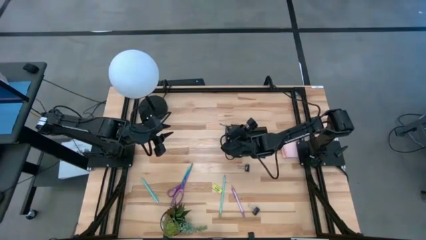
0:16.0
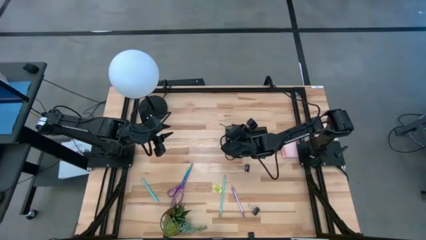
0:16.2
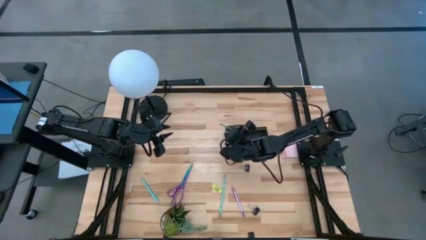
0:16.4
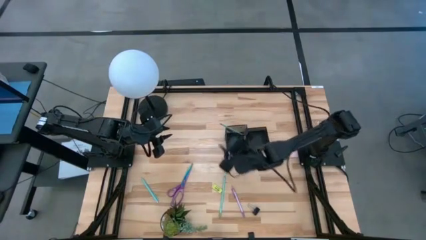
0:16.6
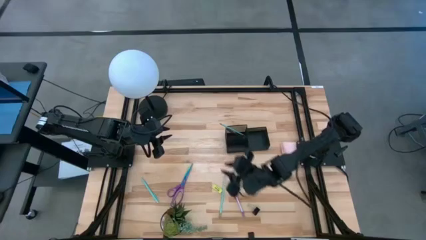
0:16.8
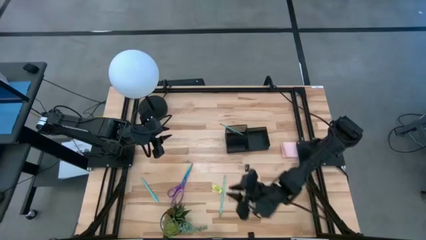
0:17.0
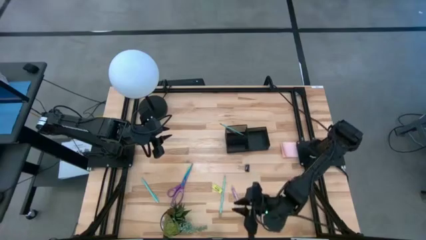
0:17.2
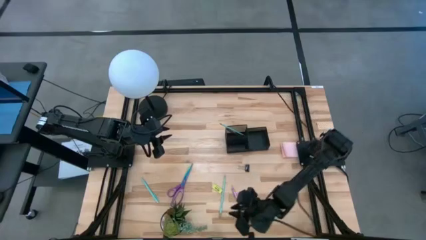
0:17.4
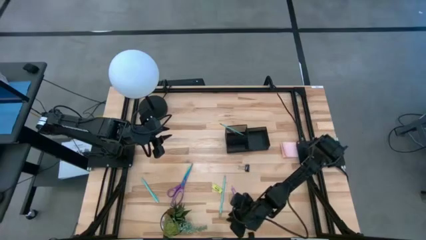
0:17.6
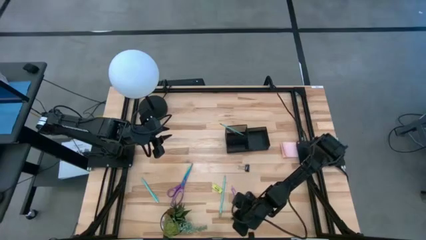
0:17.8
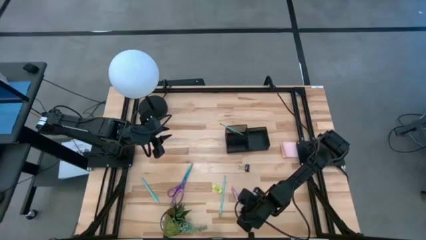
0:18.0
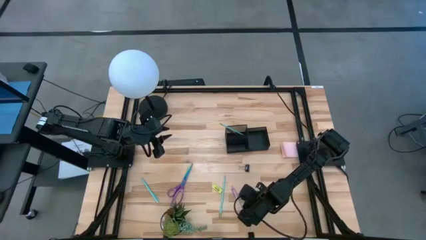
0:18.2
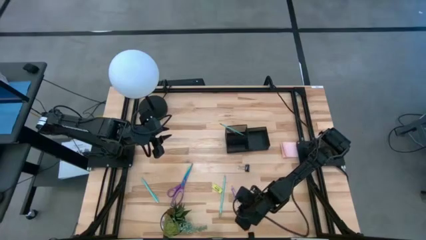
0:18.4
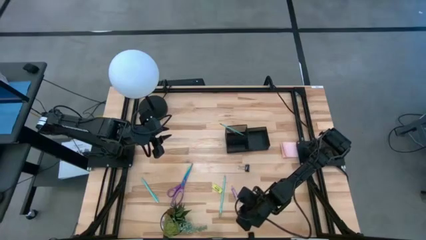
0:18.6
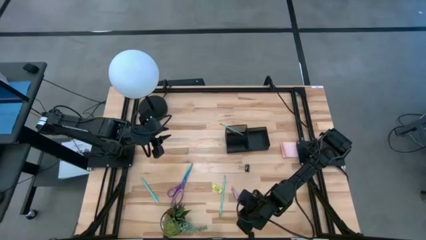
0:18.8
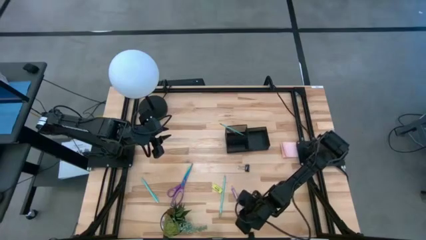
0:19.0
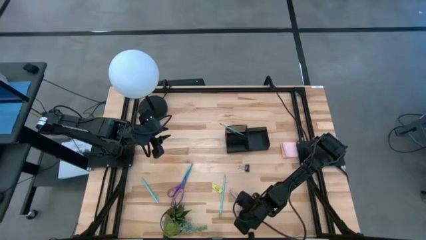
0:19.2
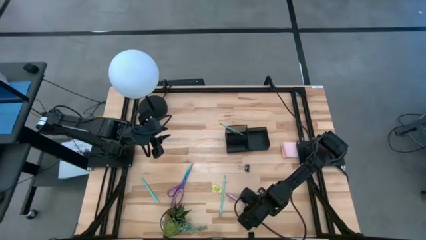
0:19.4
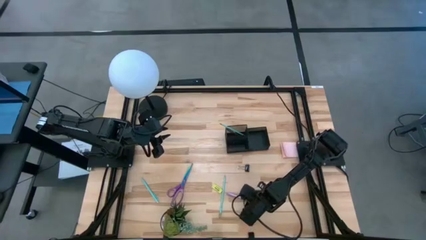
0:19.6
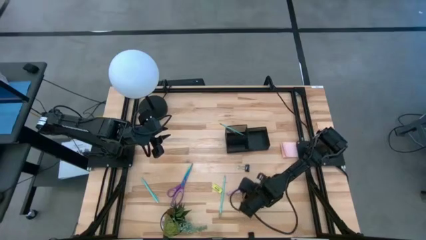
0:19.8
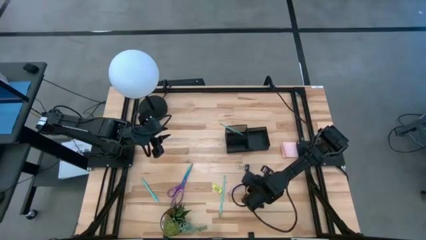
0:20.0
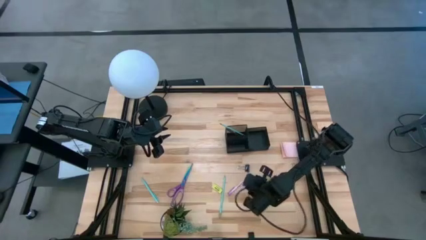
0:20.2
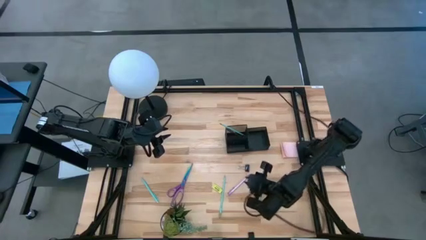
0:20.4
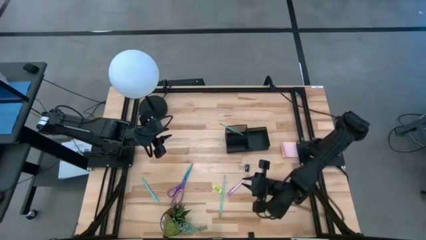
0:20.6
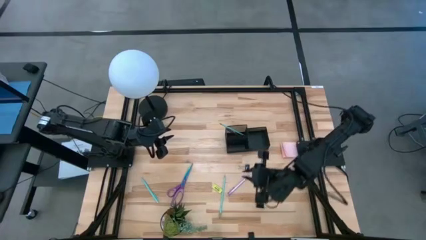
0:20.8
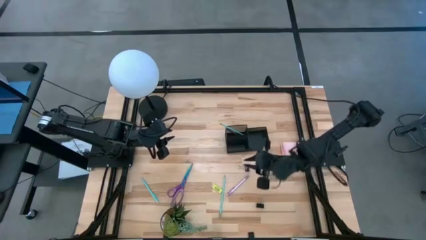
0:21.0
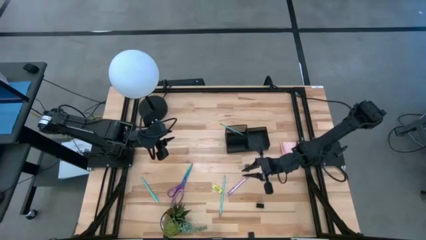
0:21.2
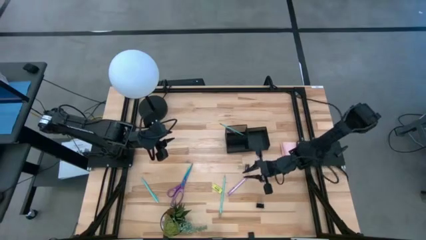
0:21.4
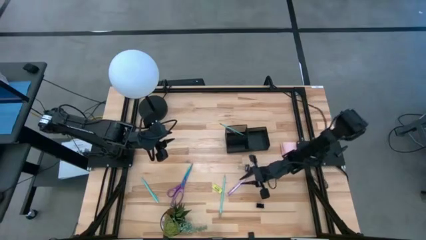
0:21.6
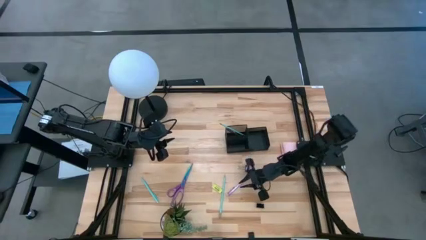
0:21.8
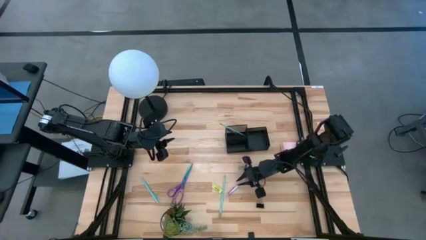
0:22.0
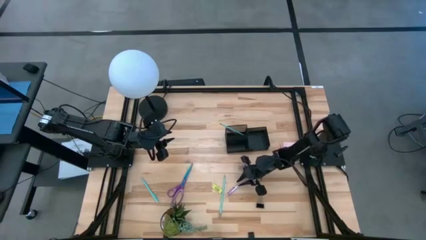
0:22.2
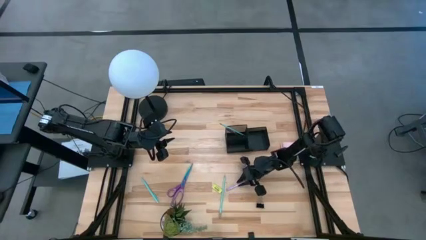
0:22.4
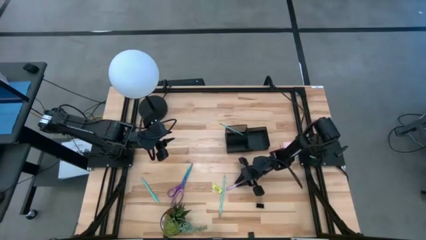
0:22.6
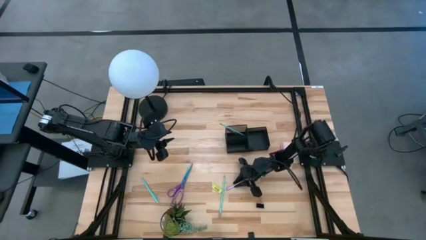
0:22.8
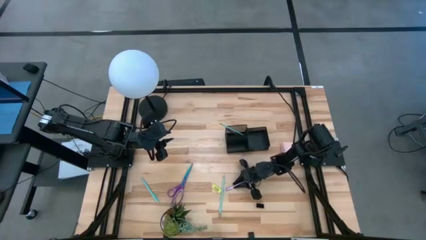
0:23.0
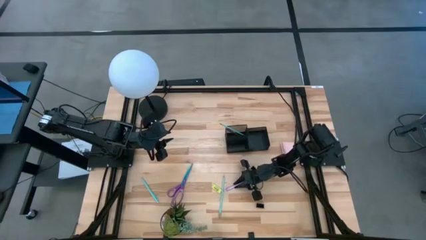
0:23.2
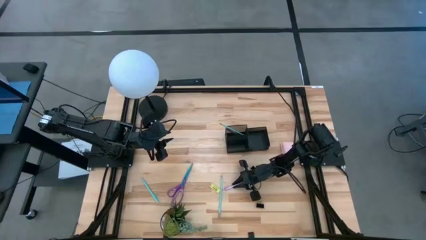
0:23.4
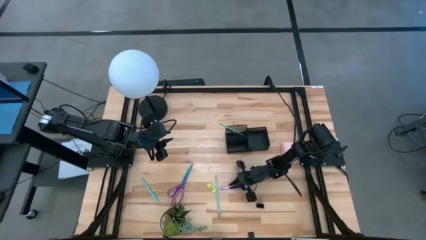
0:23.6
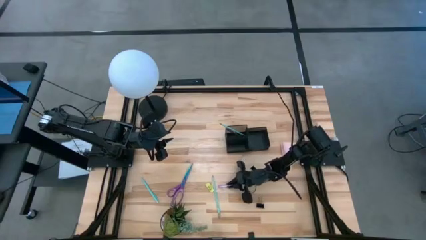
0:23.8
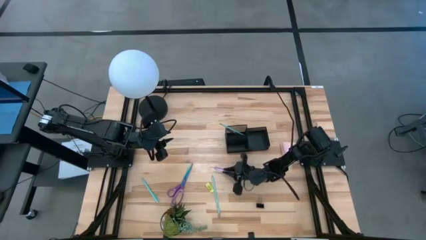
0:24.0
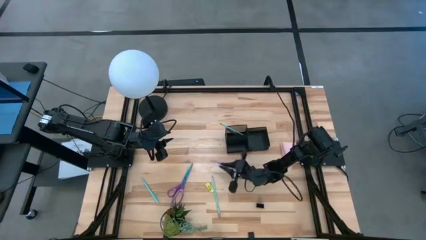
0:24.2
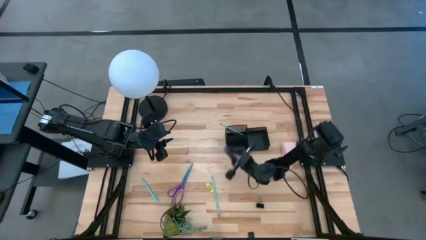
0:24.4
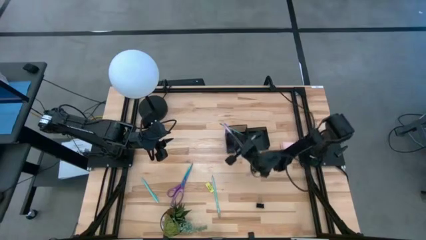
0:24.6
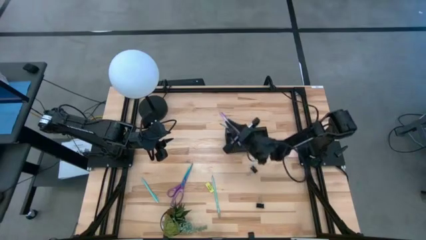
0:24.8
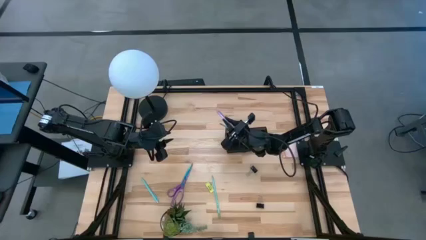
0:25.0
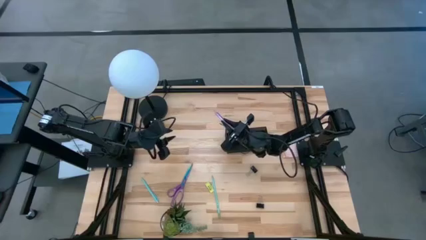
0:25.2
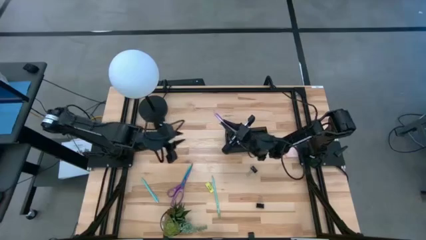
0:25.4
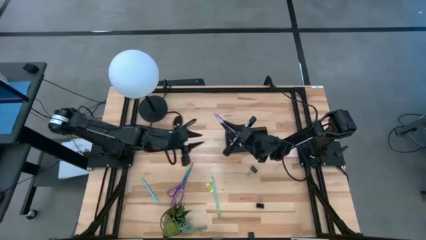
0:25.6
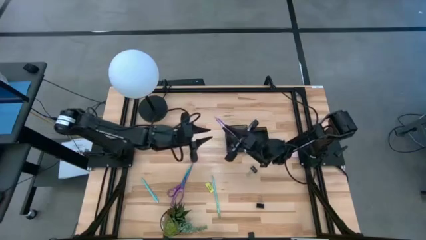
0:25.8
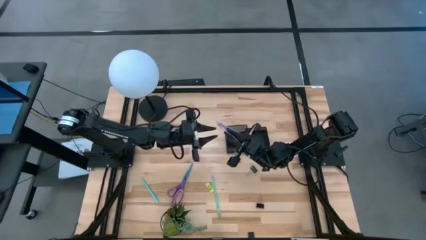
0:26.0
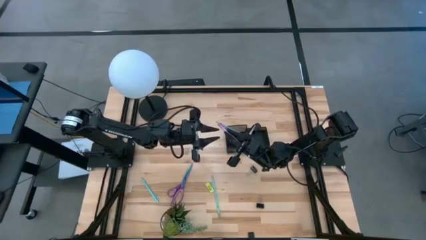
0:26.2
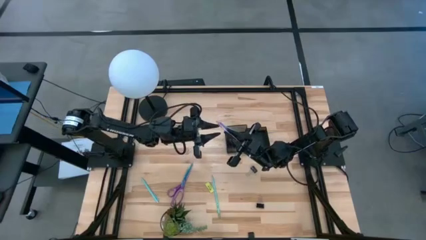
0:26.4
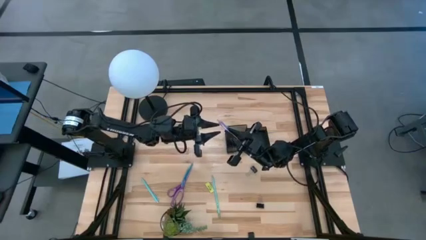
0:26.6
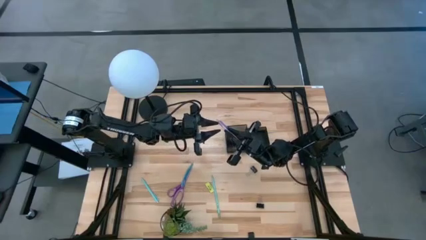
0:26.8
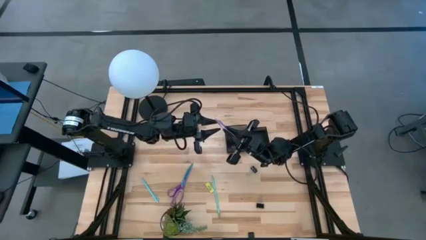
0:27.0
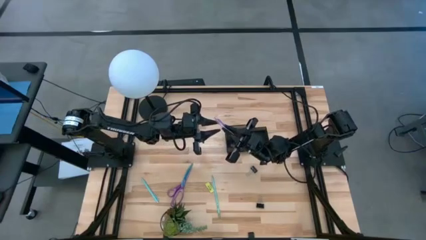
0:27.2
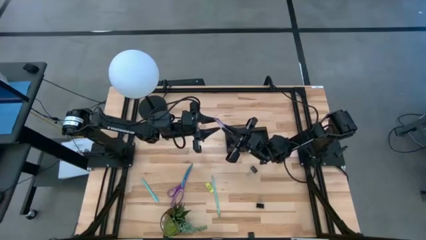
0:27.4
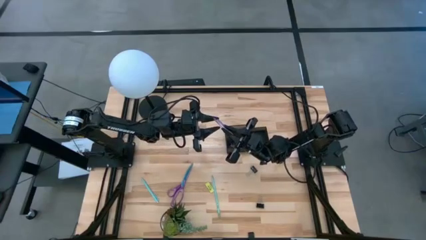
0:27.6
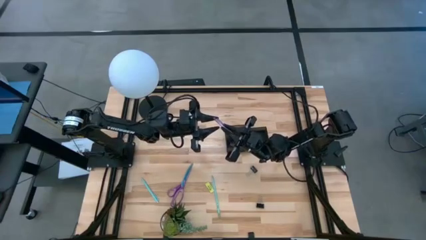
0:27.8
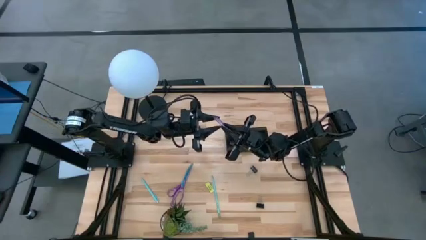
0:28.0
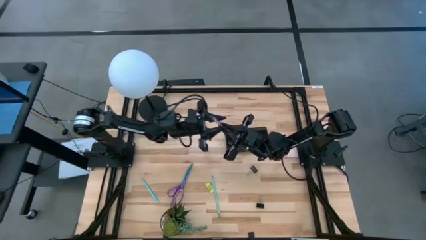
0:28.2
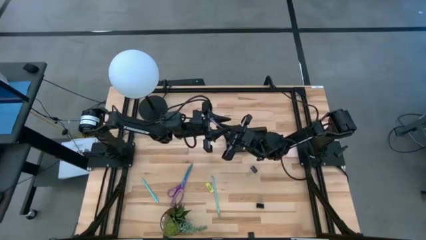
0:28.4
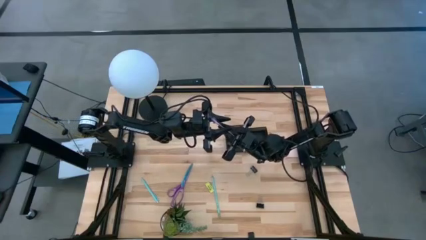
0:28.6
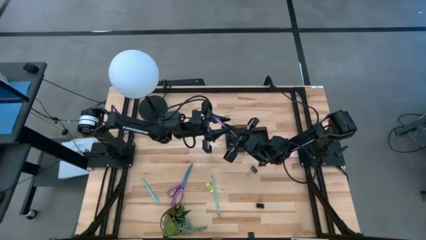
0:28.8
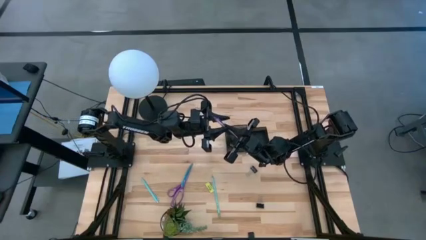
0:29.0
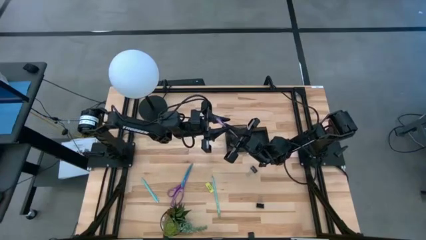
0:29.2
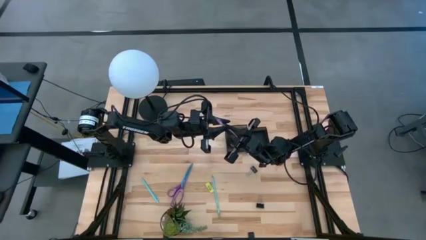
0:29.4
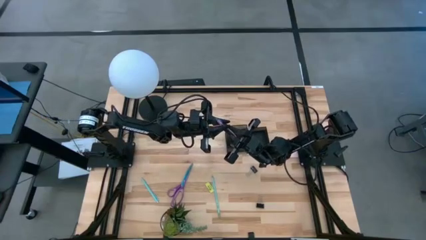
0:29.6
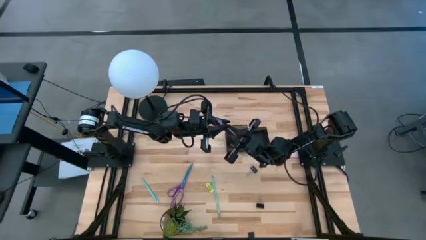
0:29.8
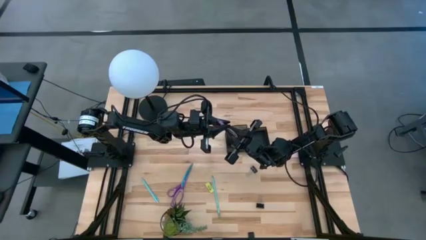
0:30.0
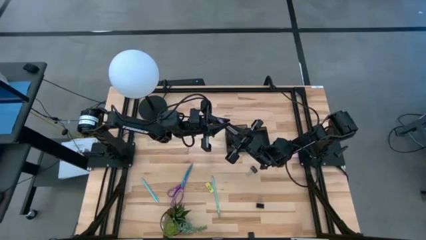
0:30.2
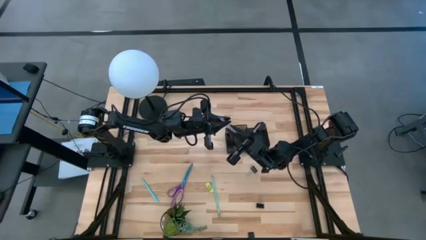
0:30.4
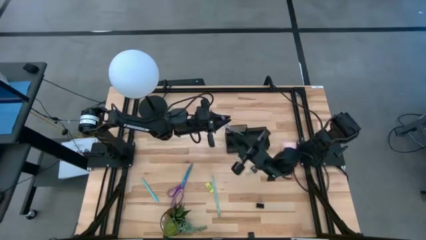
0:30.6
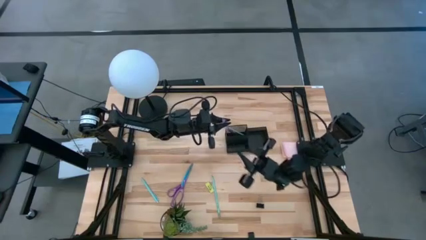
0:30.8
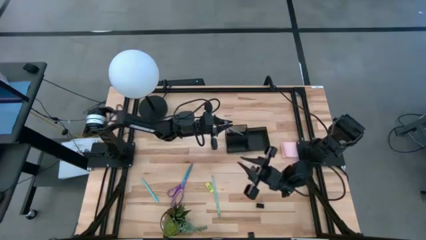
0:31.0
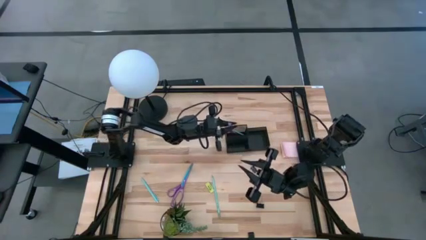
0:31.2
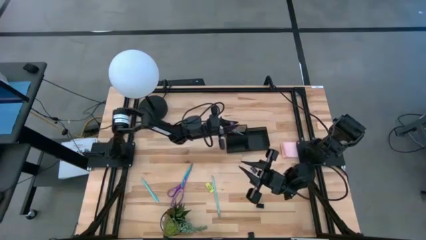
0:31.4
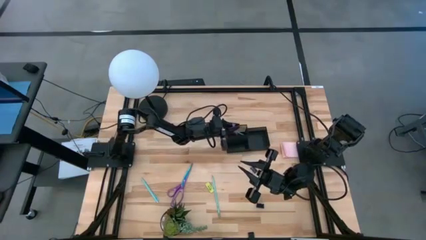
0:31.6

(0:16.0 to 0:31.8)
Task: Pick and place office supplies into organizer
Put the violet pen into the black desk organizer
